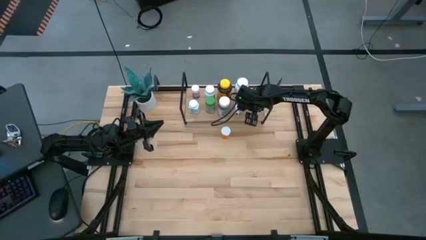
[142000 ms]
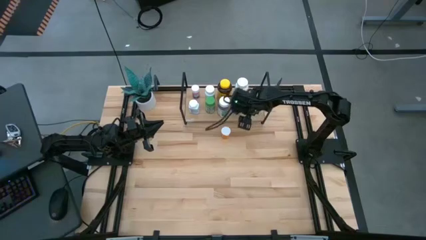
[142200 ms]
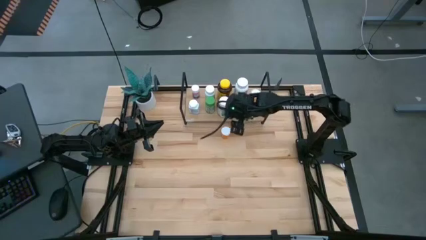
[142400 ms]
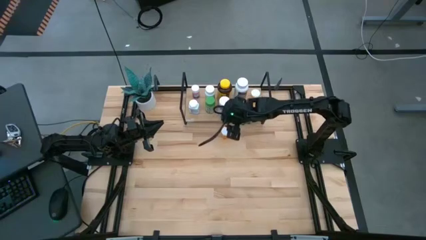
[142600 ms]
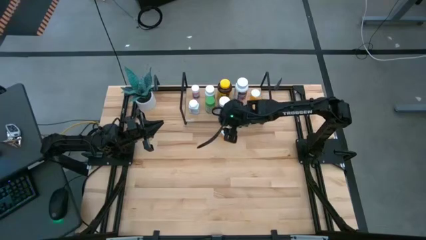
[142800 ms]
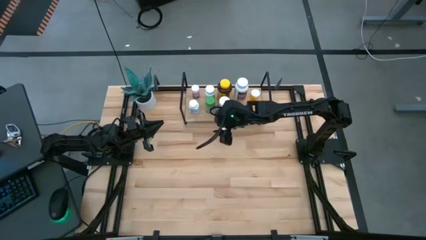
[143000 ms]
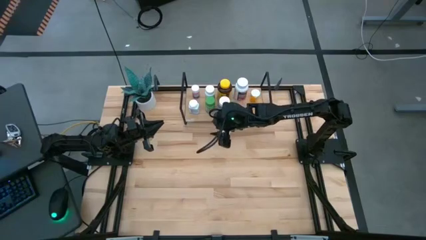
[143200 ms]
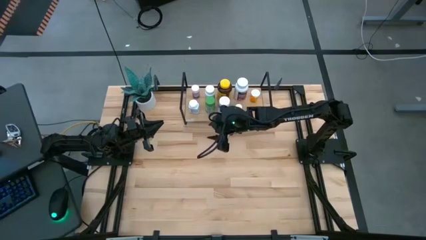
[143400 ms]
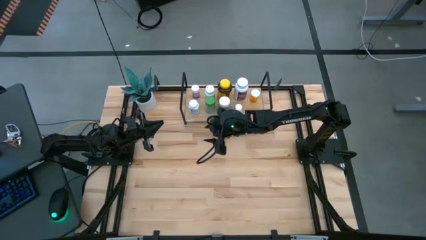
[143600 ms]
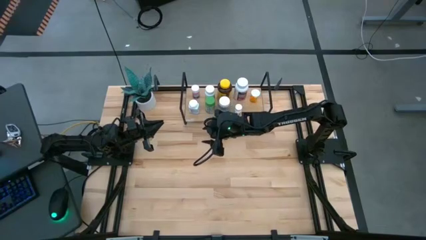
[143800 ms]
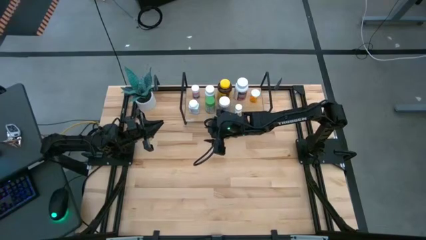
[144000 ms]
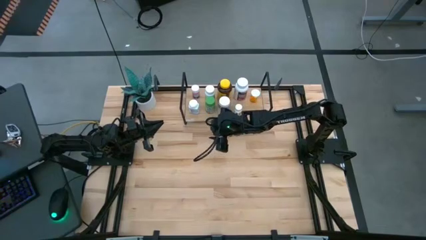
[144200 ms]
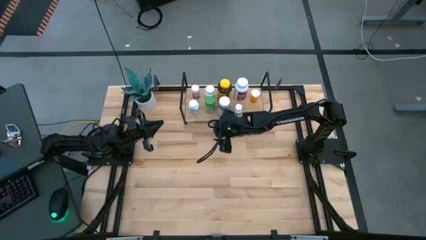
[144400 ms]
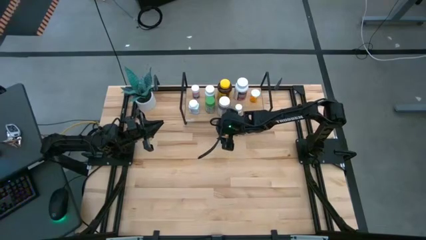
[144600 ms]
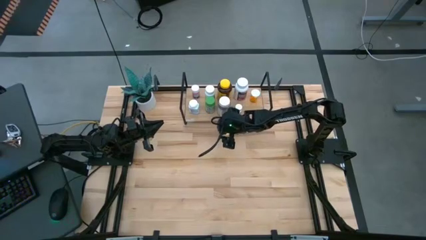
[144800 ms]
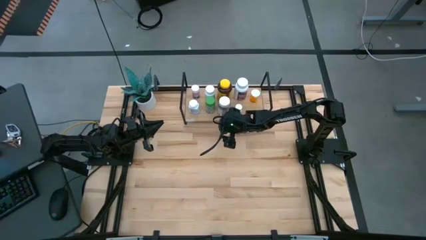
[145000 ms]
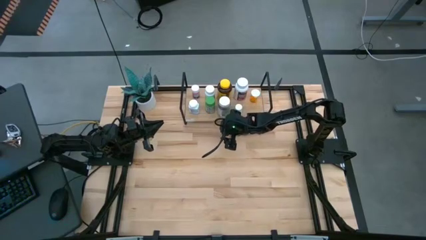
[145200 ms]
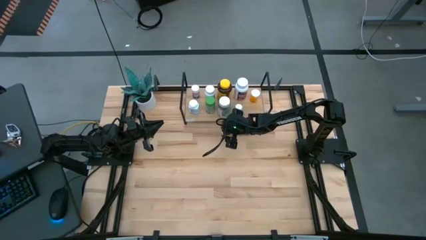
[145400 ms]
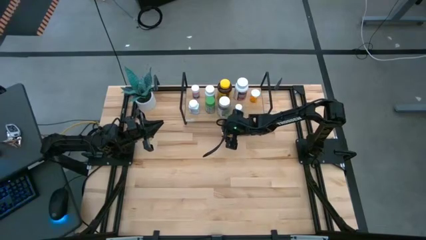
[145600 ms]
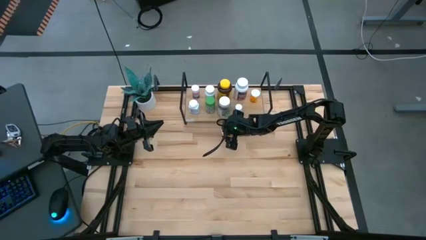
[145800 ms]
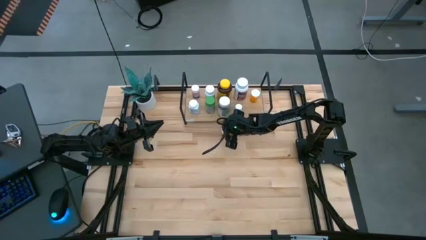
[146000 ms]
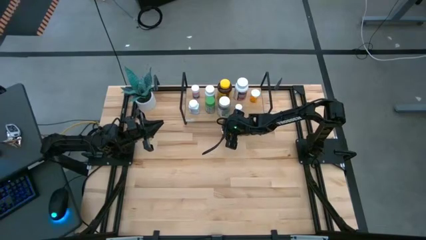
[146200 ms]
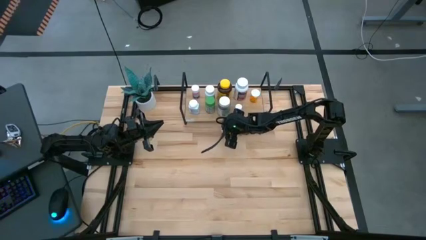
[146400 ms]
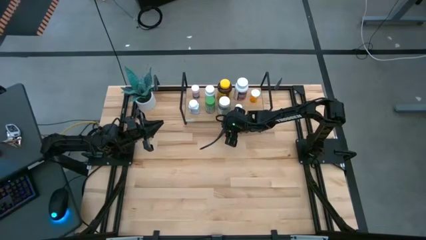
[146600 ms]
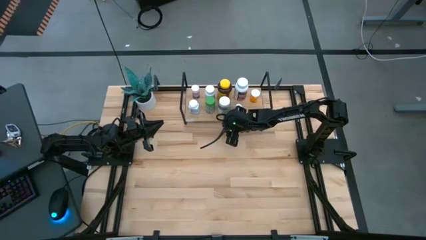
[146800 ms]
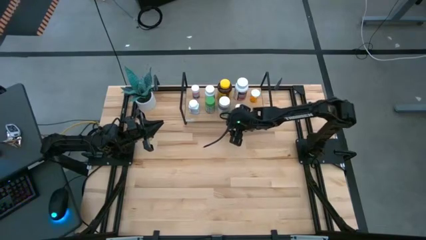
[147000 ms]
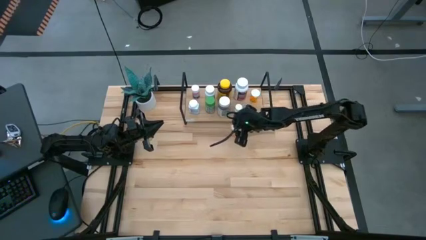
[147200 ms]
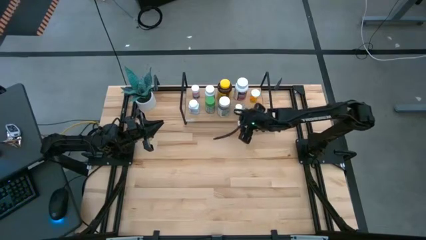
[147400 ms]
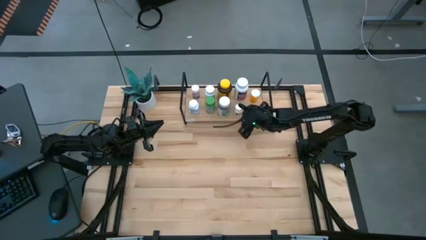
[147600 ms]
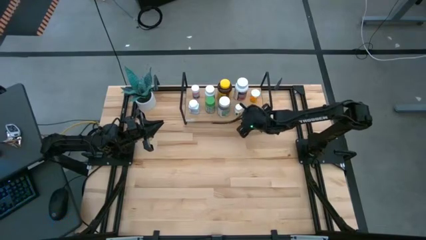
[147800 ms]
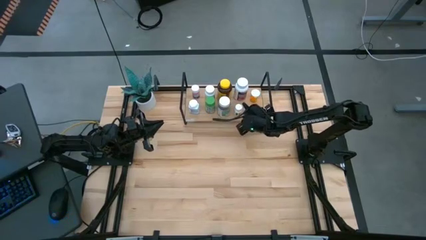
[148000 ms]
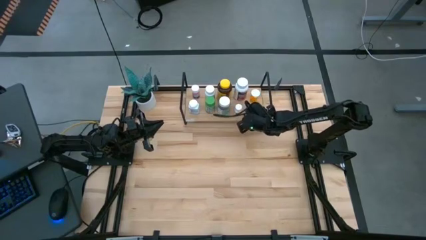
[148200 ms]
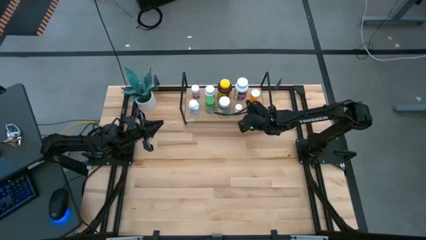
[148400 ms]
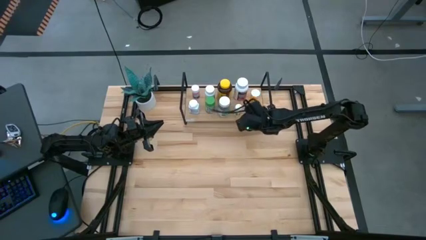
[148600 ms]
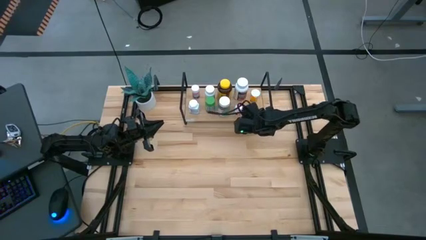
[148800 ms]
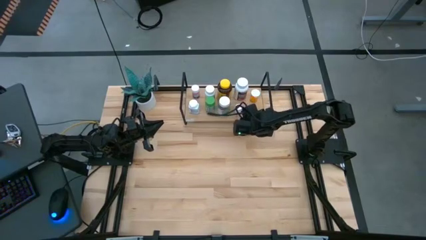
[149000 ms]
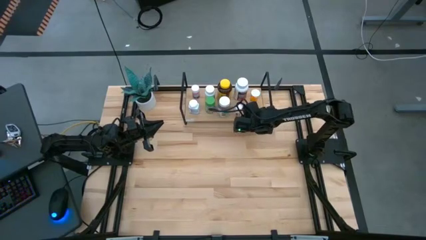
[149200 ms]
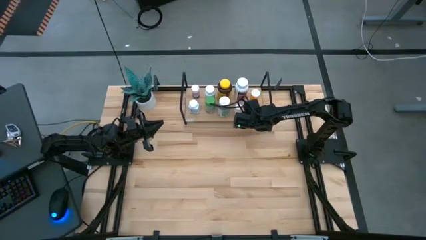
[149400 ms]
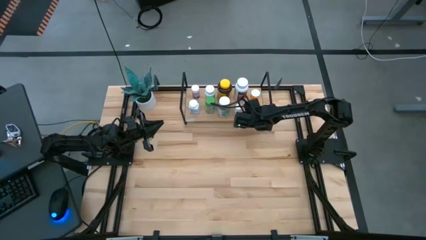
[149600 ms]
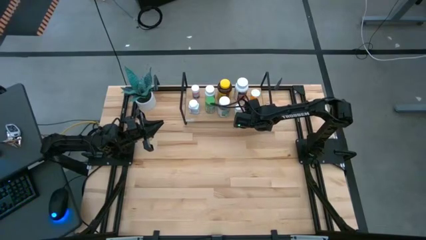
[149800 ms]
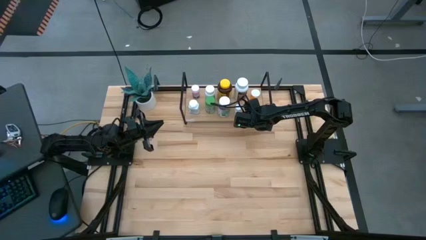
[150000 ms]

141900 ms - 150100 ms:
Task: Pick and place medicine bottles onto shelf by color
Put the orange pill bottle on the shelf

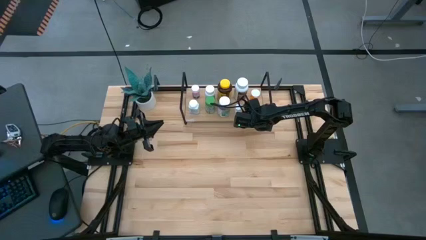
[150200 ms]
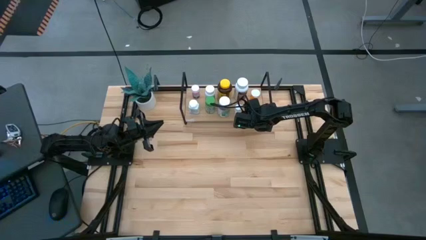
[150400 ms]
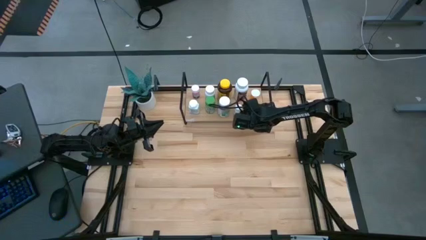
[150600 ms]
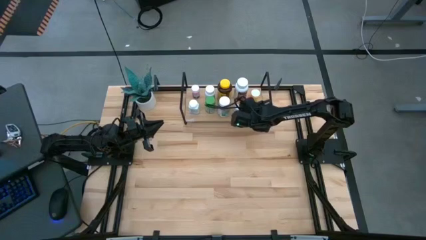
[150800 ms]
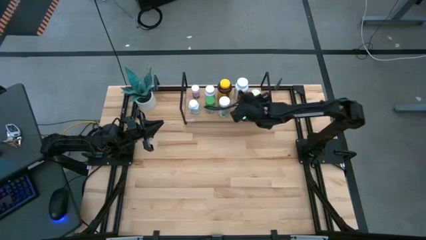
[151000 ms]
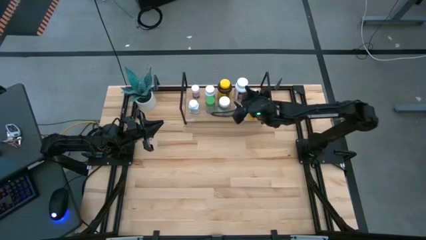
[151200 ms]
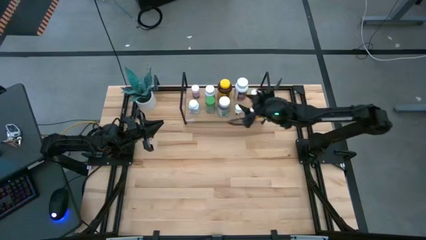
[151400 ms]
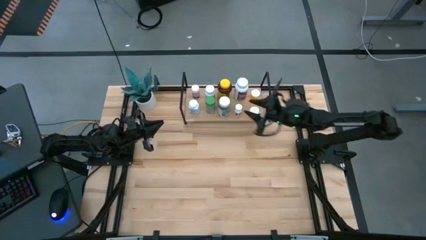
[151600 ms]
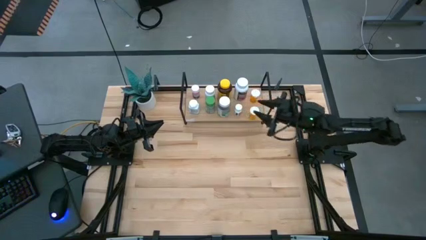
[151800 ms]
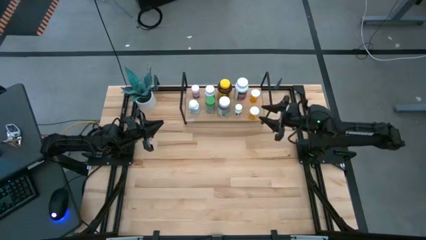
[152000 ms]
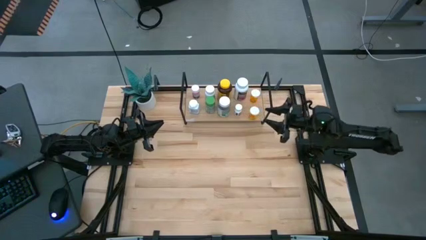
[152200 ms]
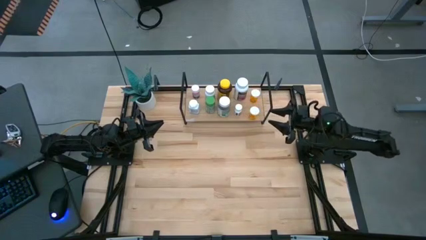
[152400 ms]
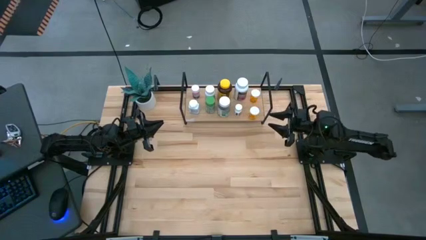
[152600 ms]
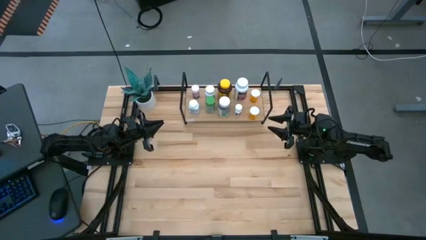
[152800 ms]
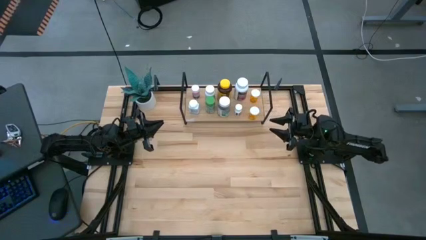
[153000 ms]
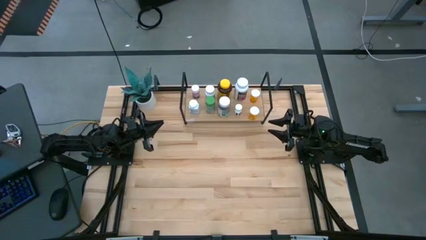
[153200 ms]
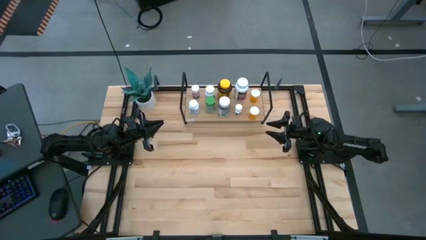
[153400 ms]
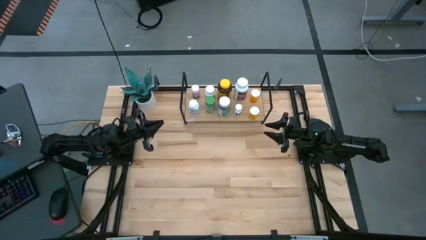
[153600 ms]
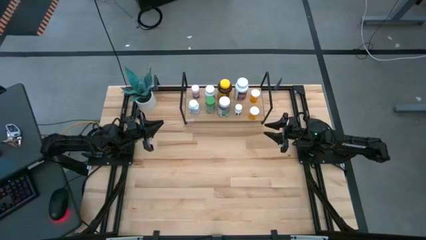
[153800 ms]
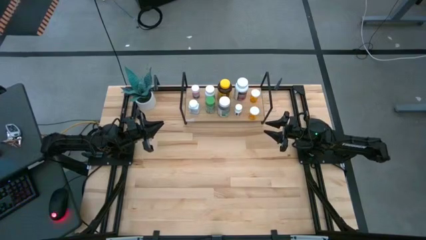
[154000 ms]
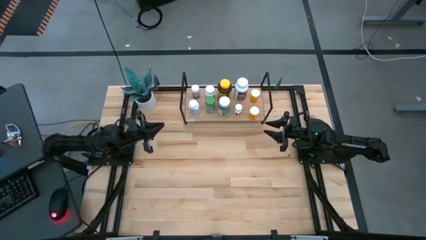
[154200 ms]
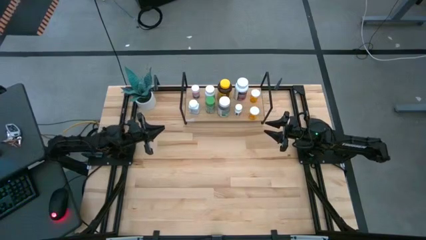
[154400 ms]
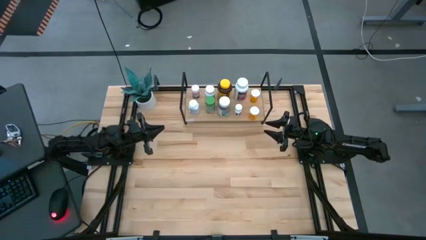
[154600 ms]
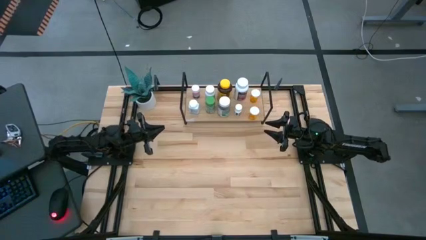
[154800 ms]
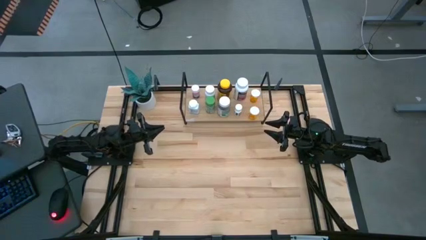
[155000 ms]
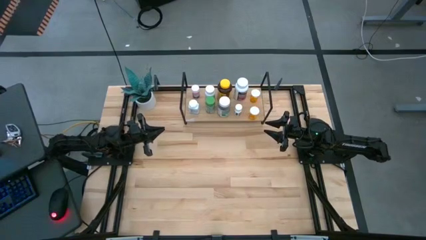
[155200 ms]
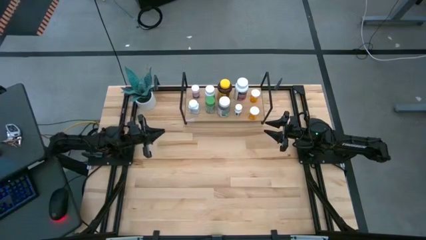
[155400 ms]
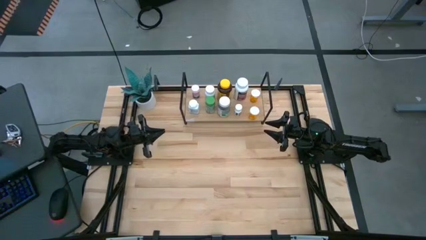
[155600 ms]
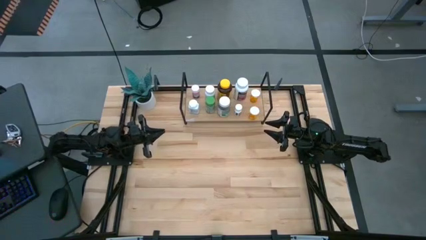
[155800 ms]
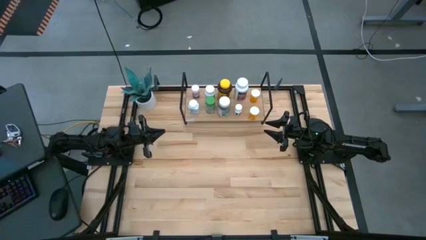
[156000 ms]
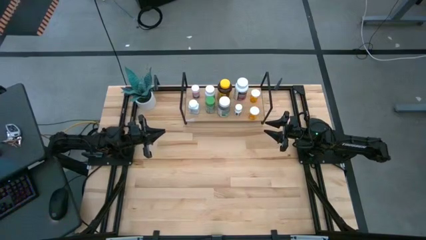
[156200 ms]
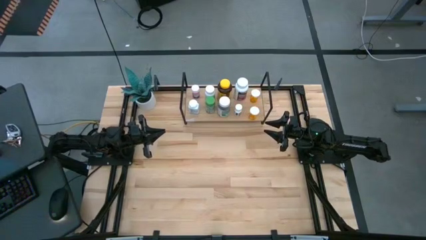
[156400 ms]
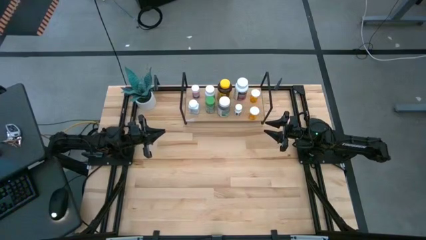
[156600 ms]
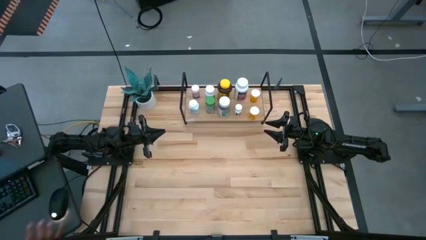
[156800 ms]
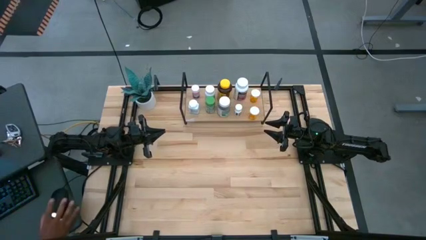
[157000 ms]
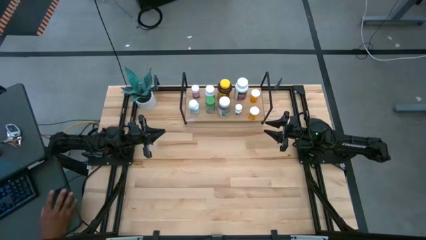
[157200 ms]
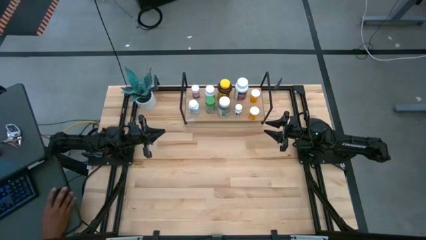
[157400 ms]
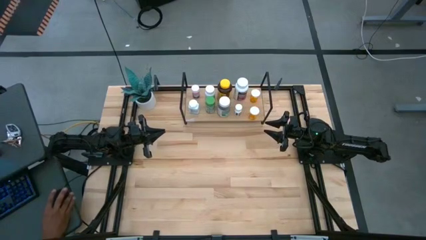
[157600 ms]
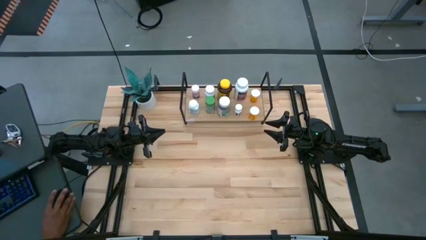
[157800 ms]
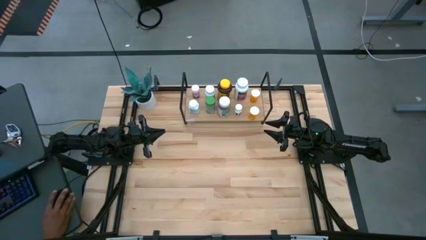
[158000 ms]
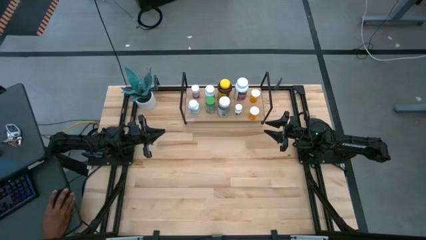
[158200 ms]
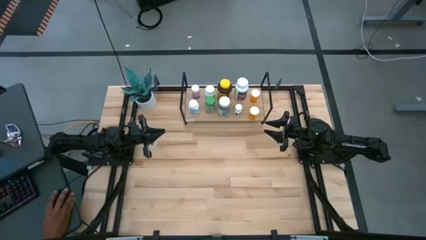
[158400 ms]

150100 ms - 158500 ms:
Return to Home Position
